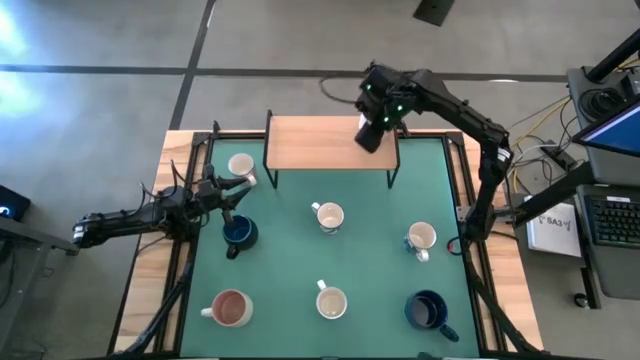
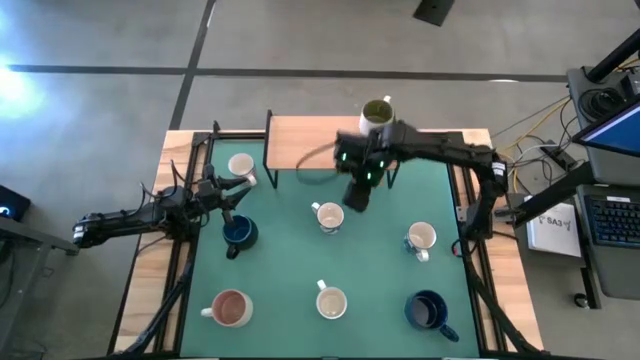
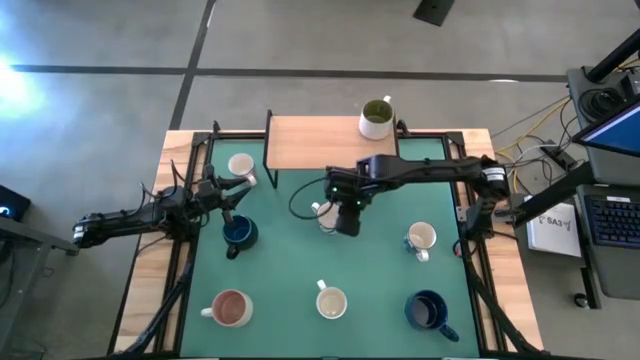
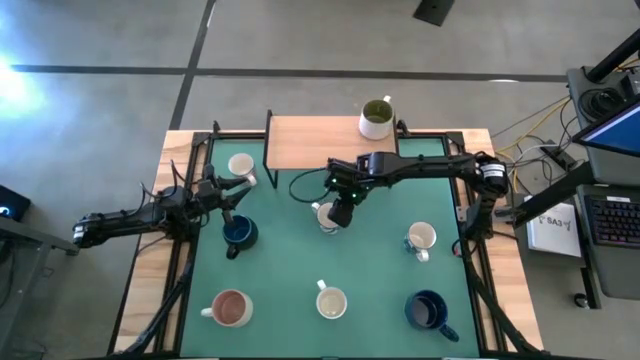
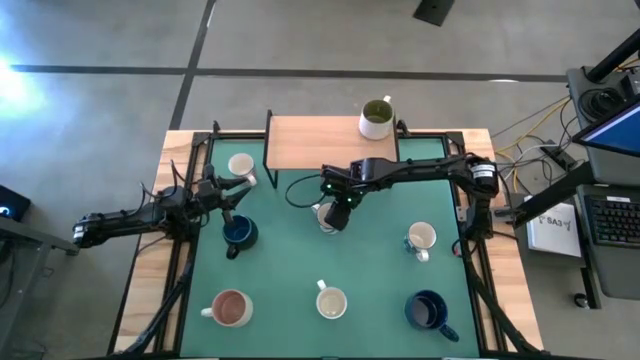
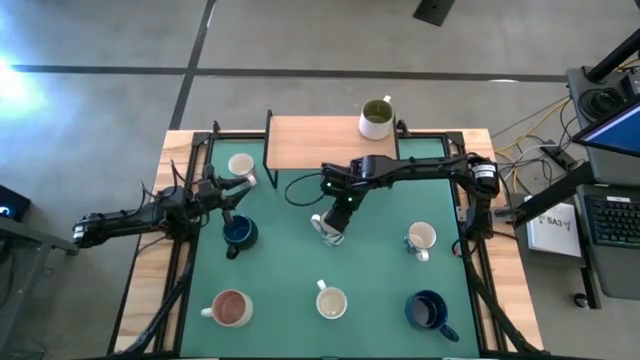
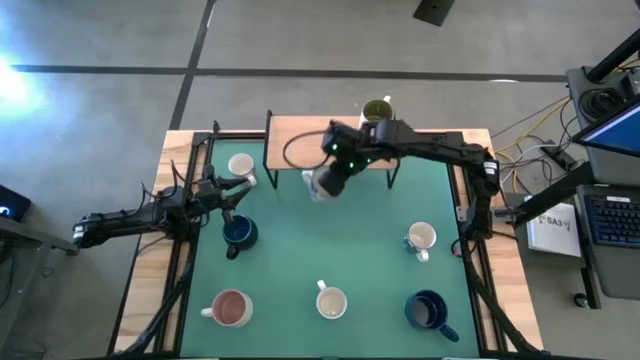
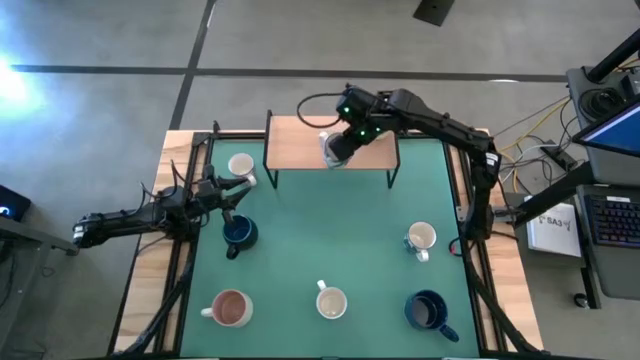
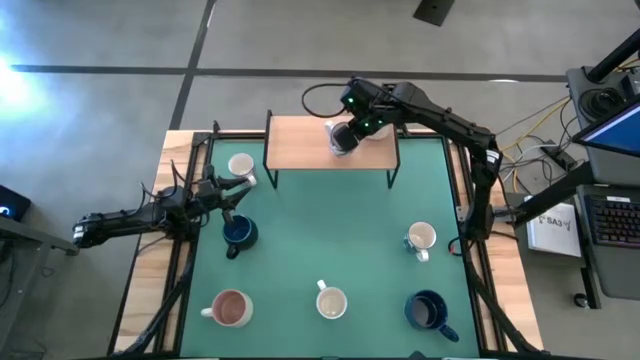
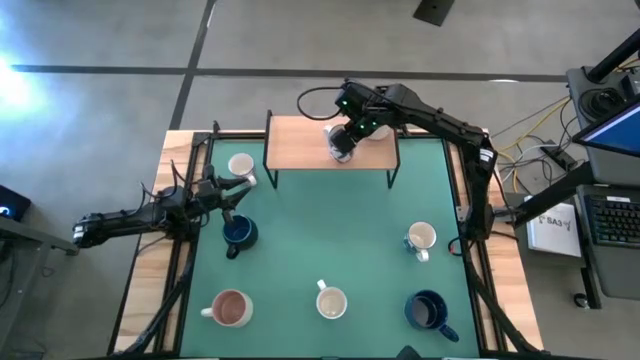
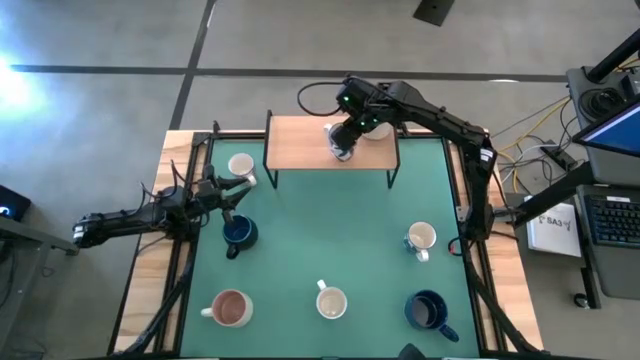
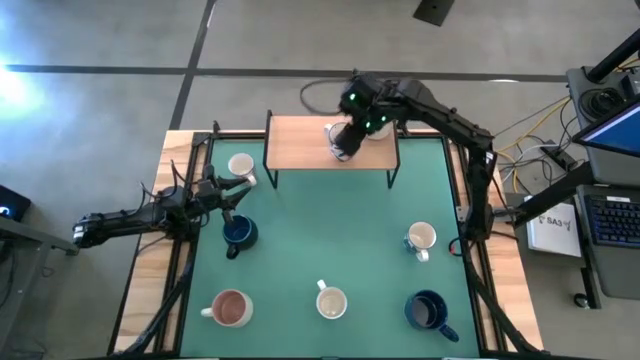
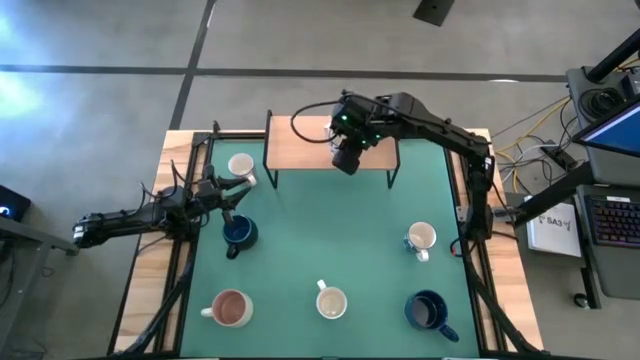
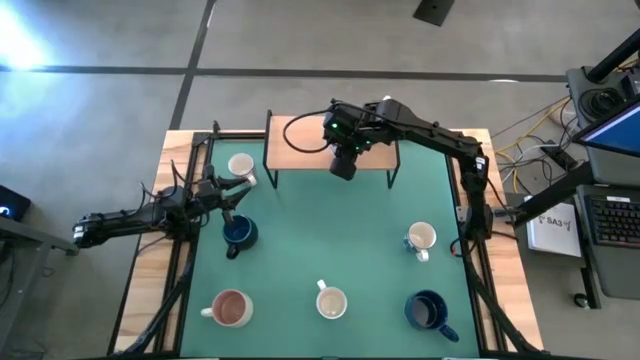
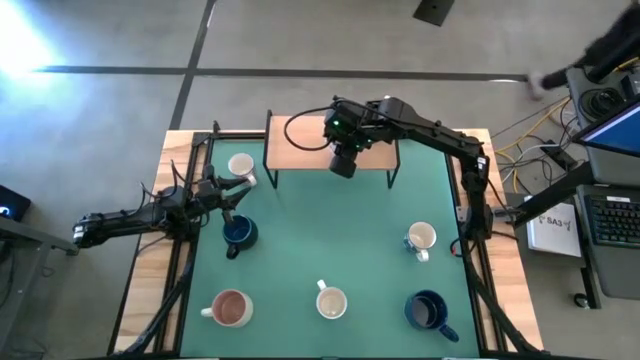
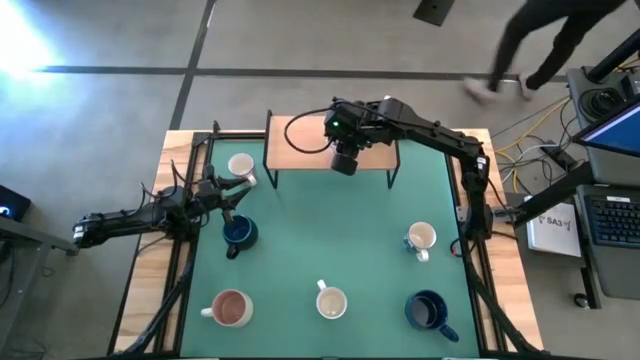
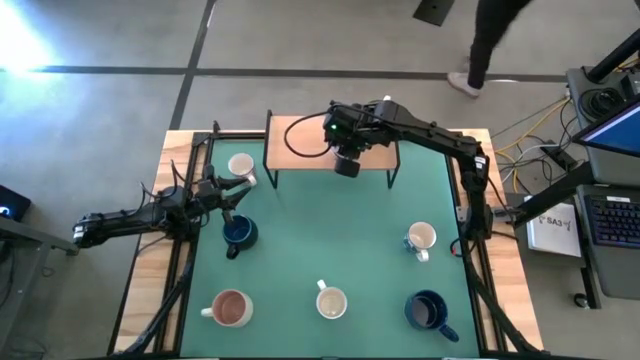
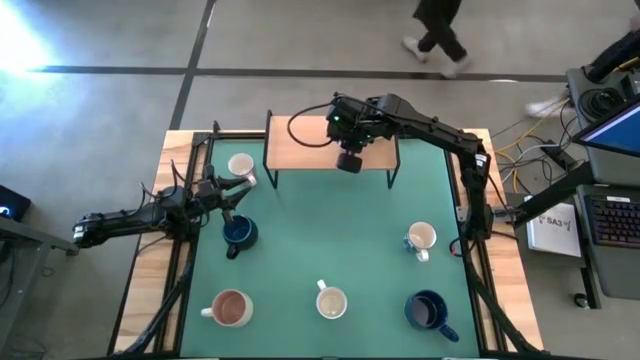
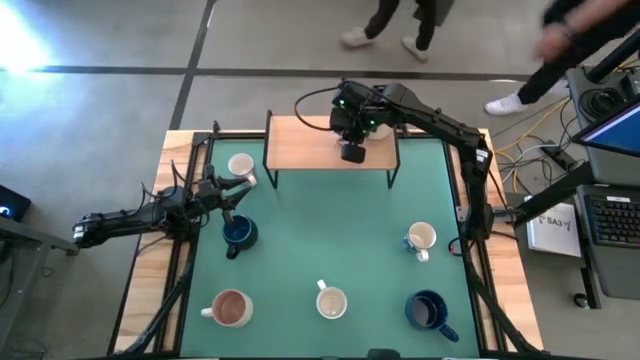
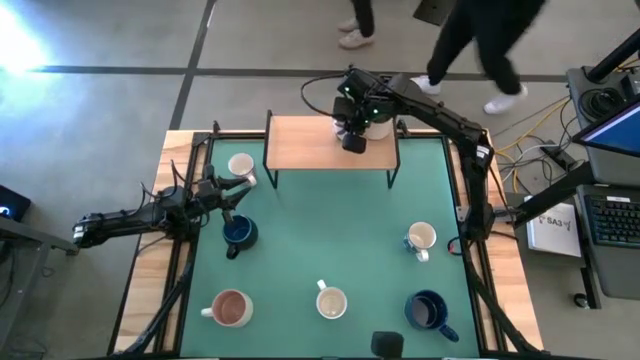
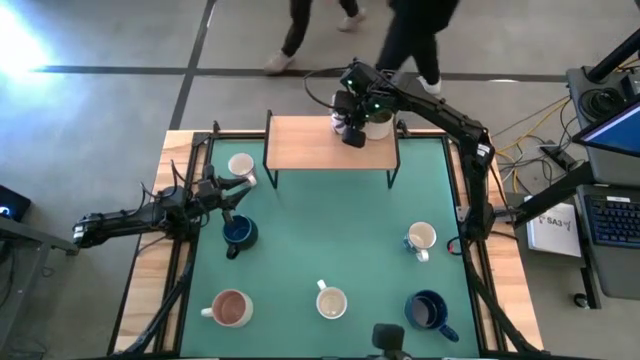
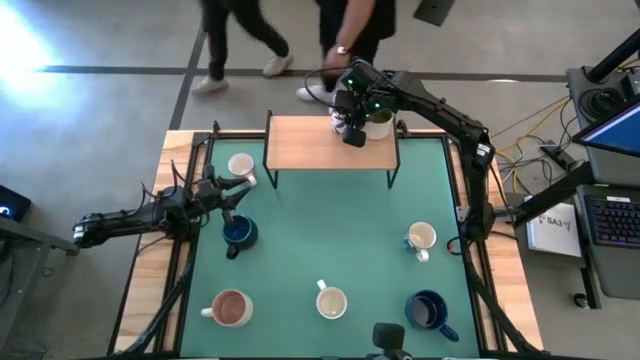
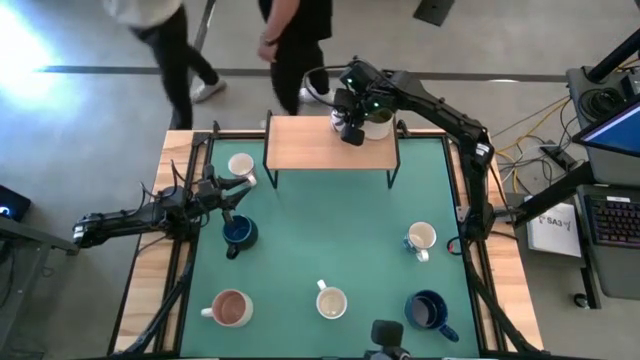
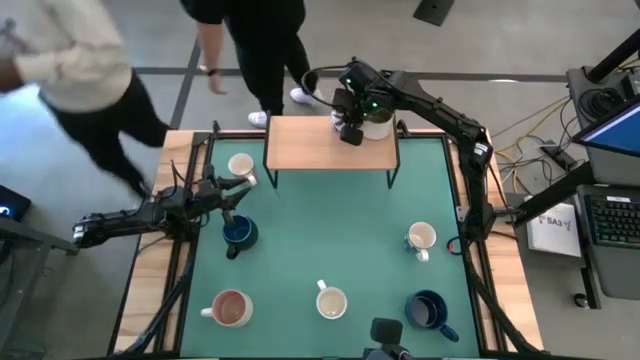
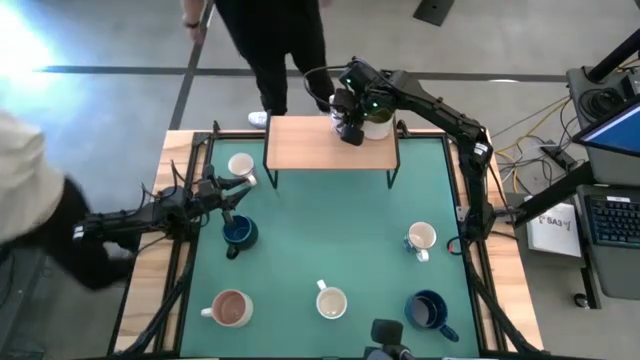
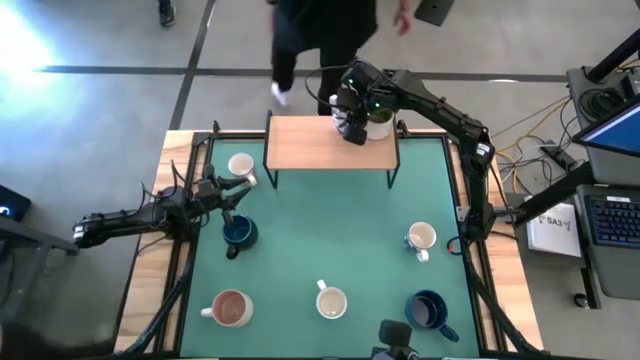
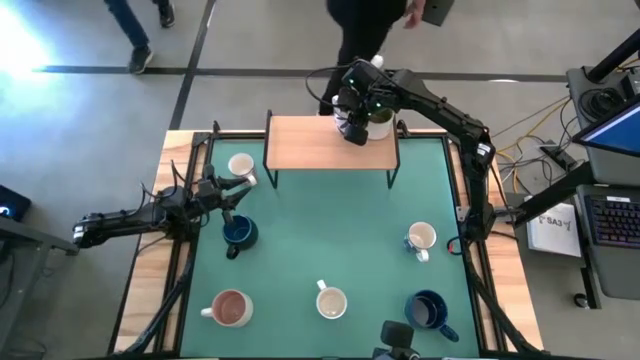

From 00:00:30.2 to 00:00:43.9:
Task: Place coffee mugs
Put the left blue mug on the shelf
